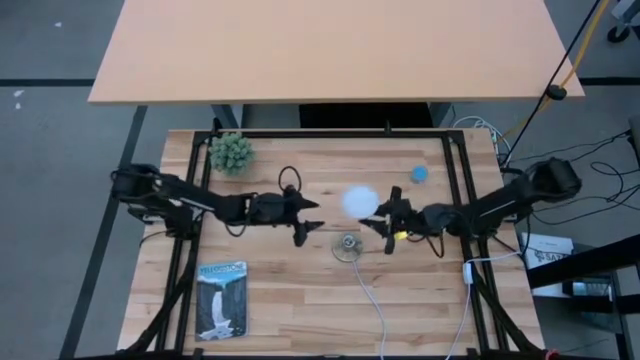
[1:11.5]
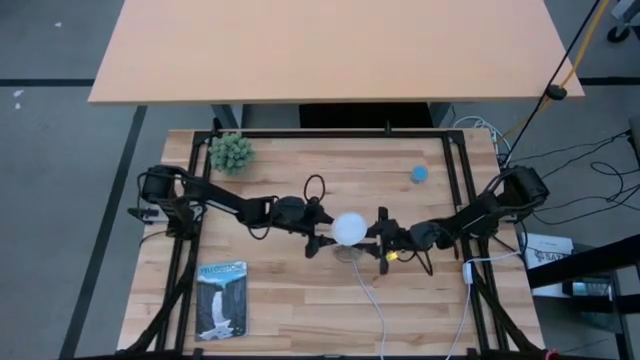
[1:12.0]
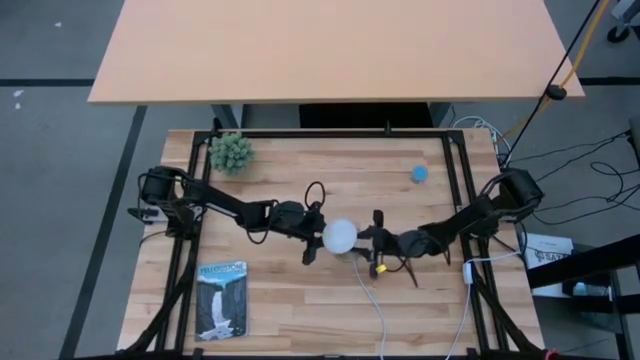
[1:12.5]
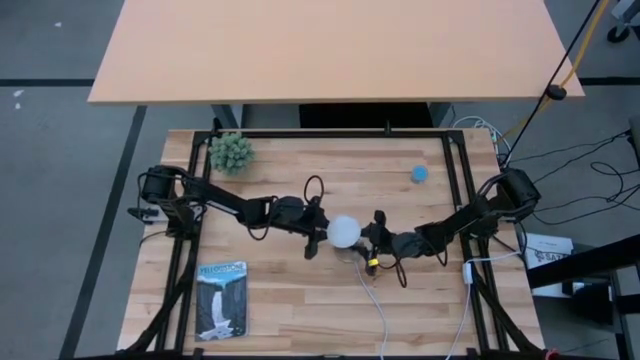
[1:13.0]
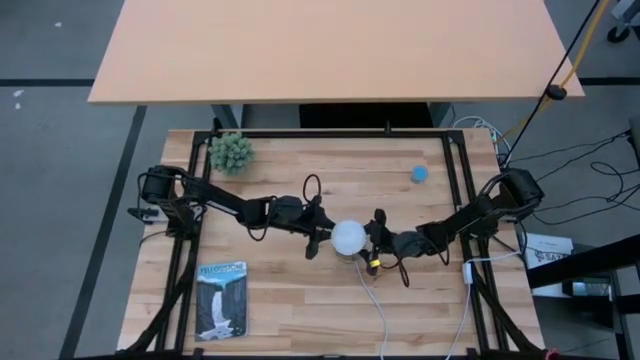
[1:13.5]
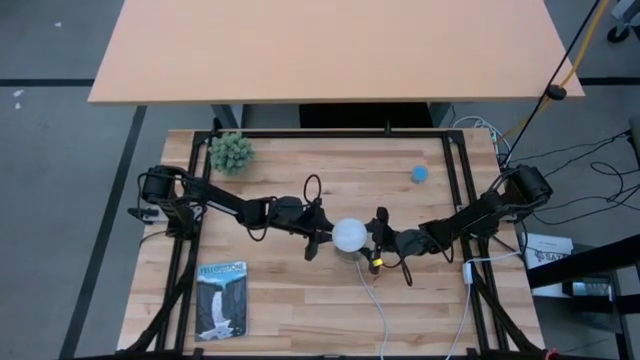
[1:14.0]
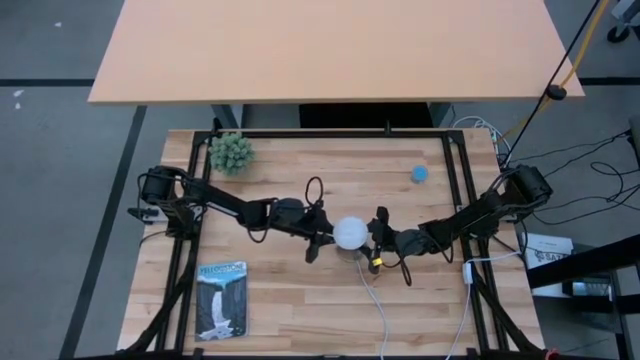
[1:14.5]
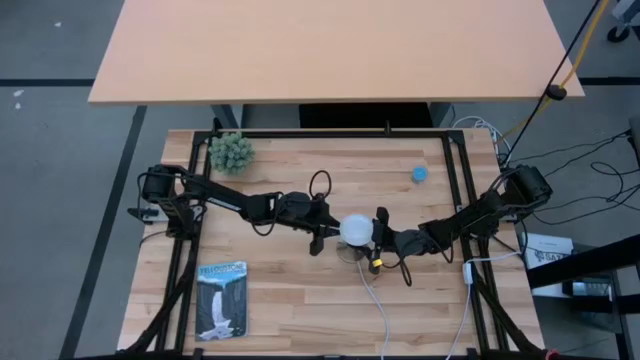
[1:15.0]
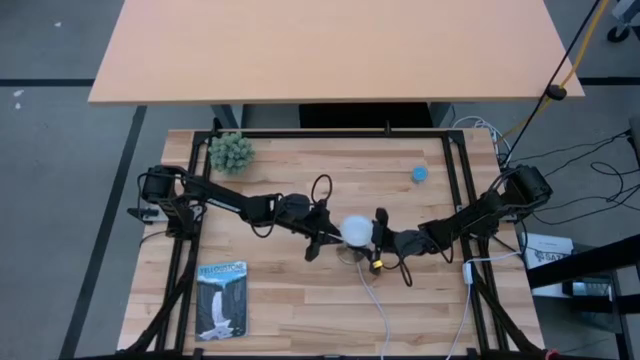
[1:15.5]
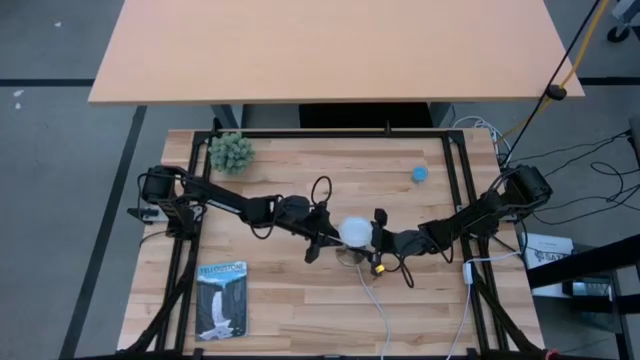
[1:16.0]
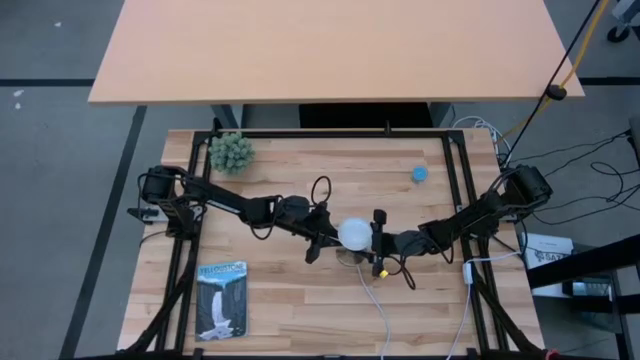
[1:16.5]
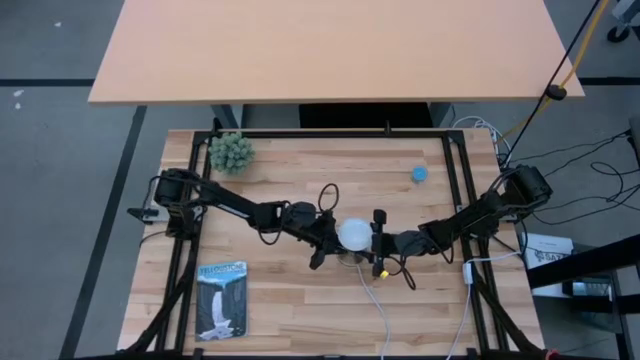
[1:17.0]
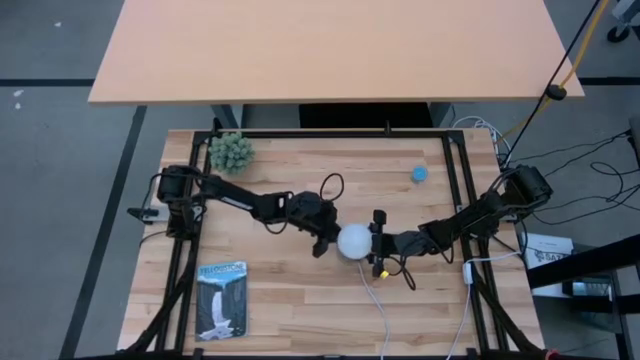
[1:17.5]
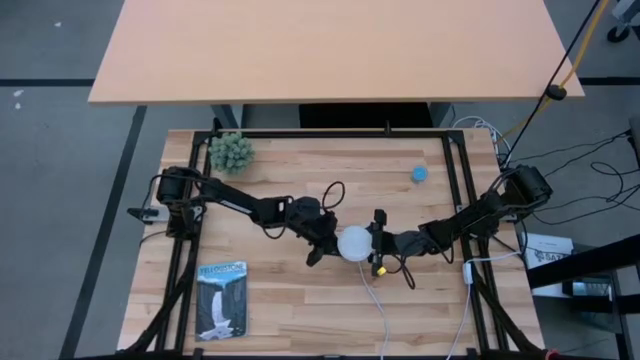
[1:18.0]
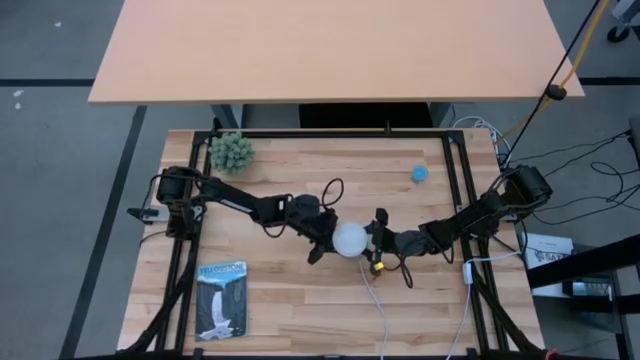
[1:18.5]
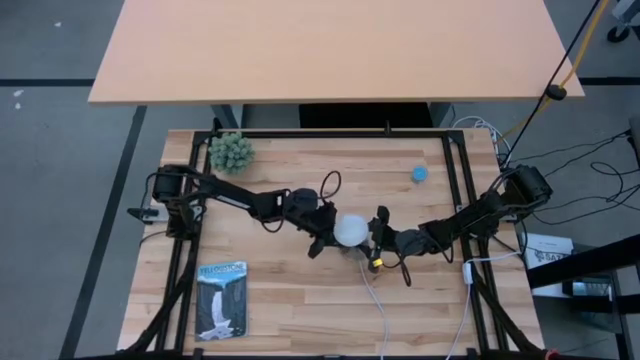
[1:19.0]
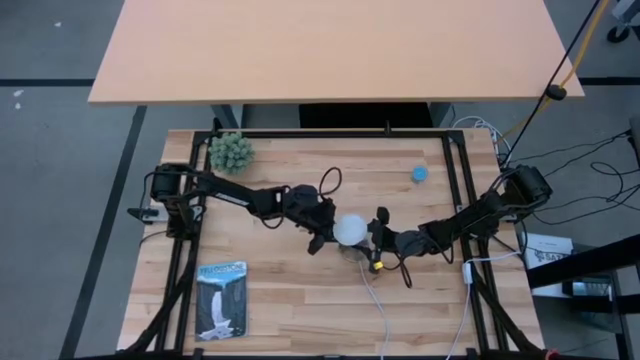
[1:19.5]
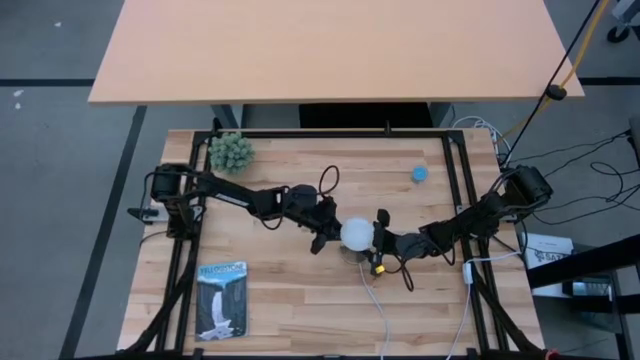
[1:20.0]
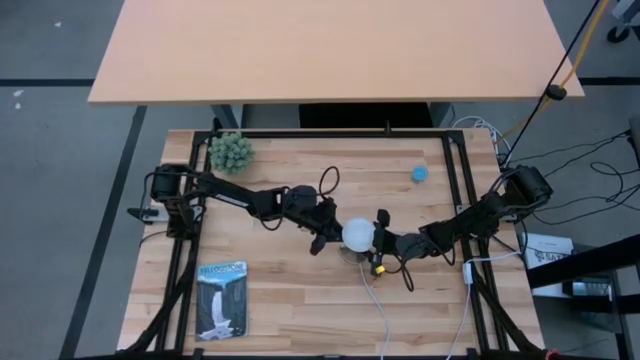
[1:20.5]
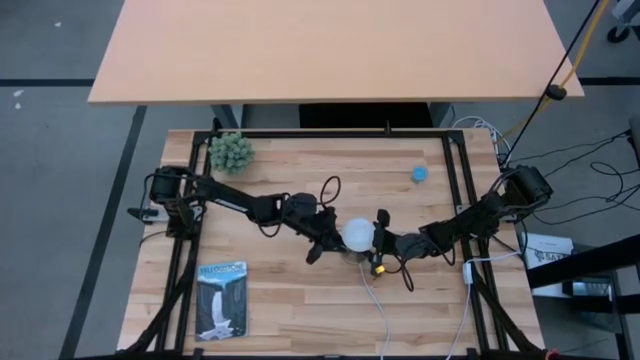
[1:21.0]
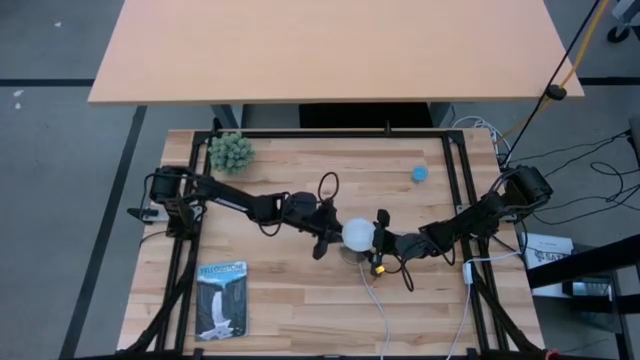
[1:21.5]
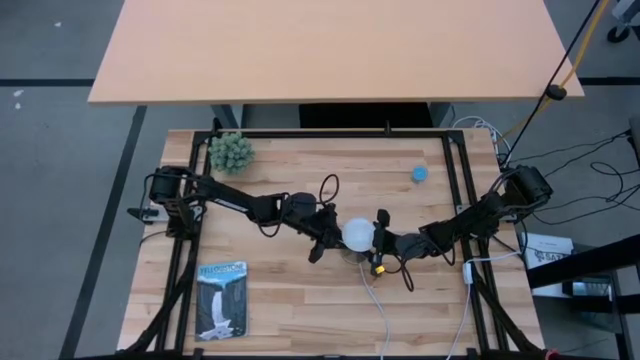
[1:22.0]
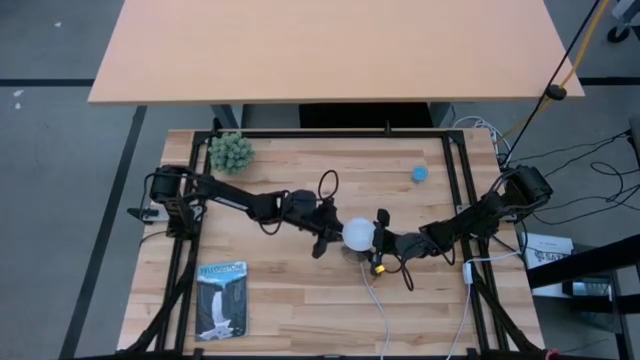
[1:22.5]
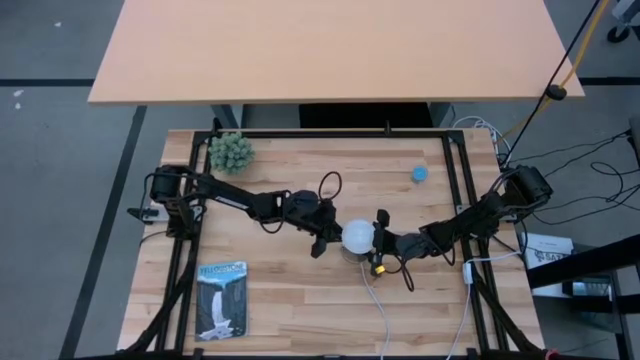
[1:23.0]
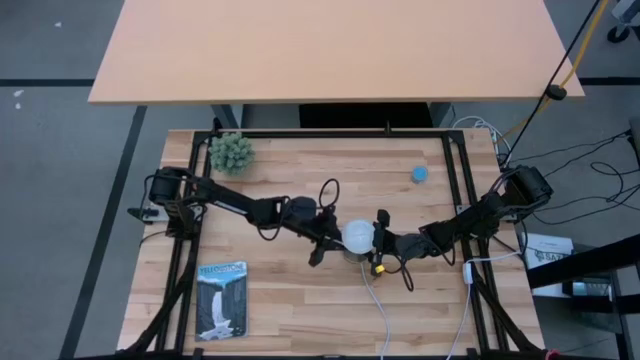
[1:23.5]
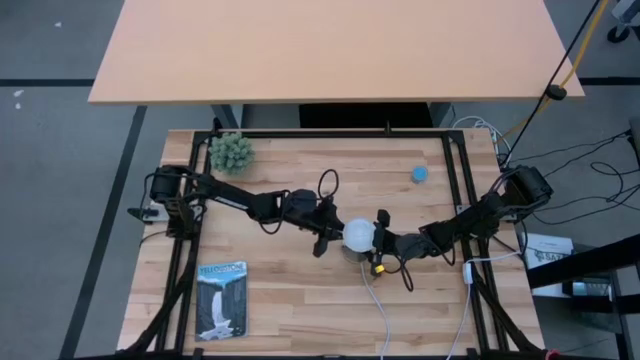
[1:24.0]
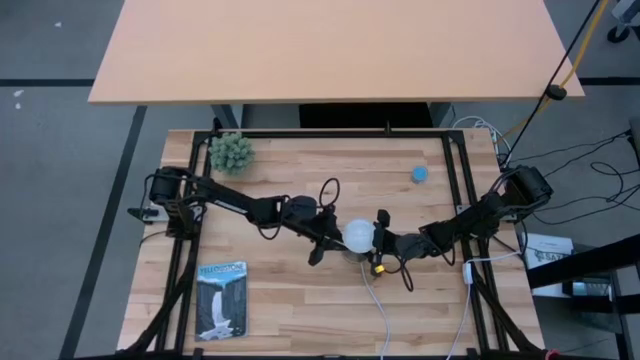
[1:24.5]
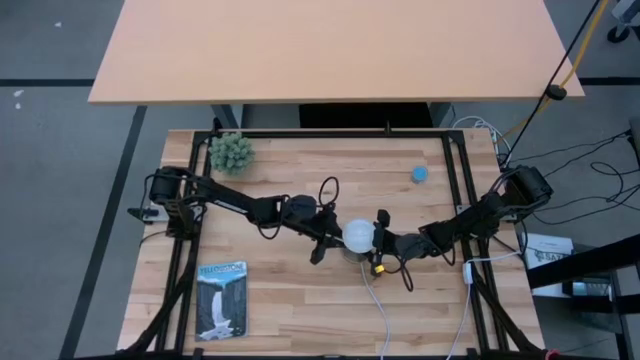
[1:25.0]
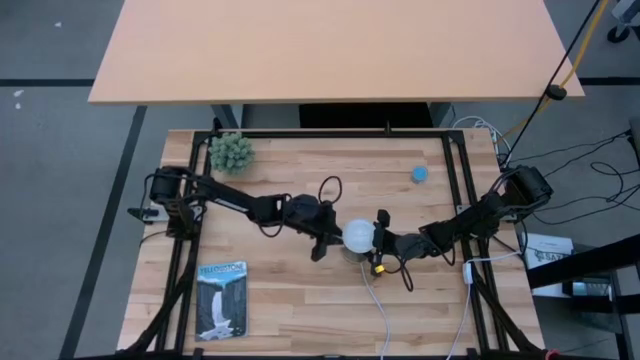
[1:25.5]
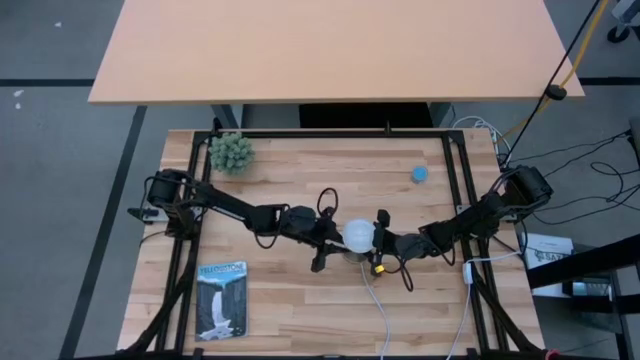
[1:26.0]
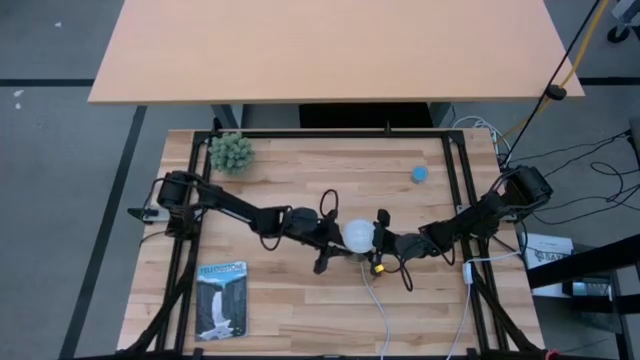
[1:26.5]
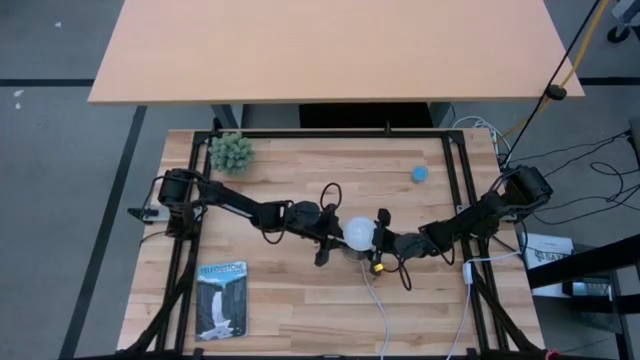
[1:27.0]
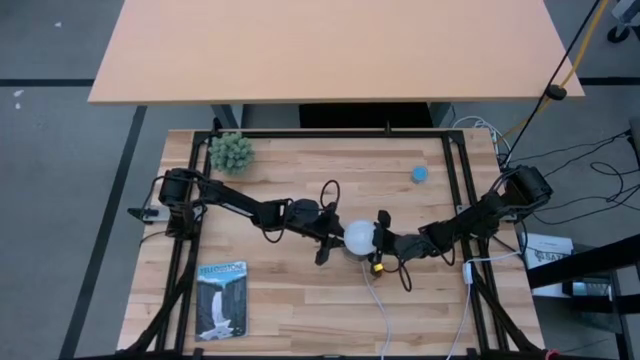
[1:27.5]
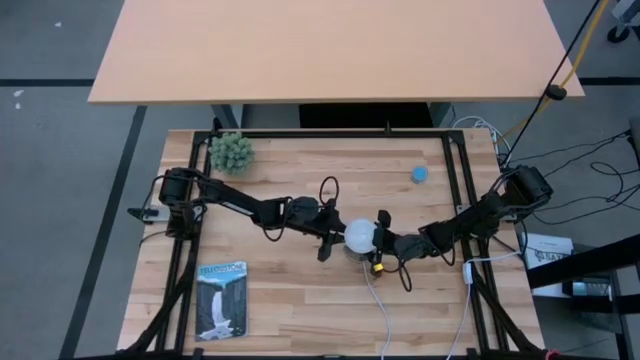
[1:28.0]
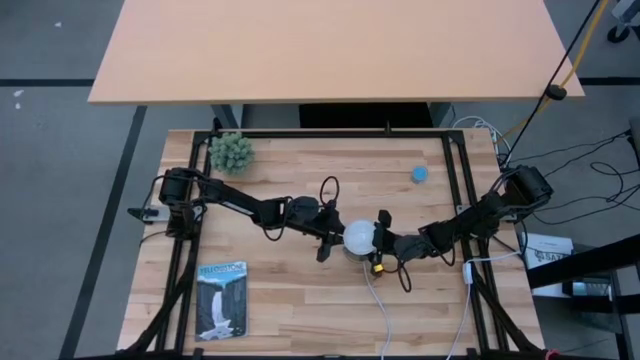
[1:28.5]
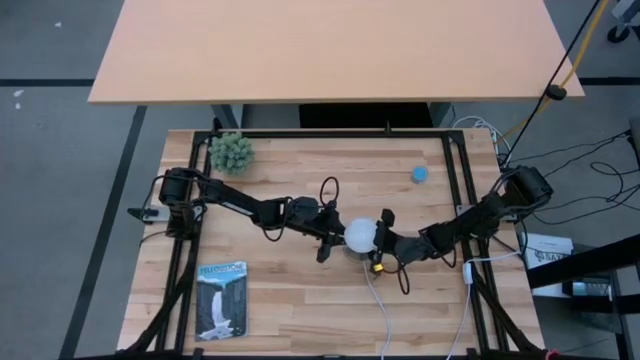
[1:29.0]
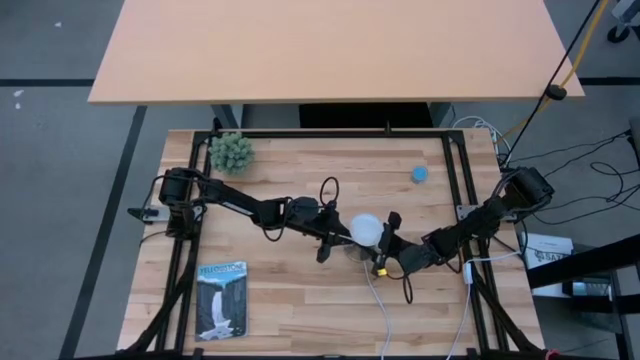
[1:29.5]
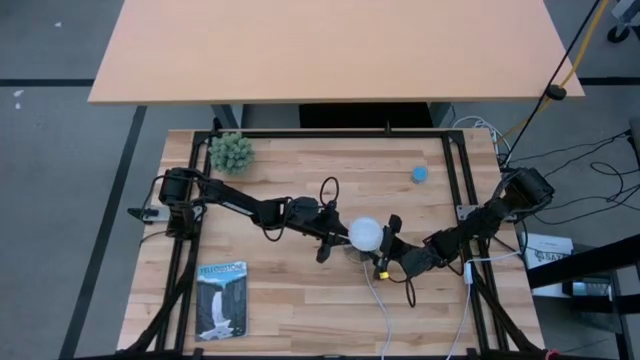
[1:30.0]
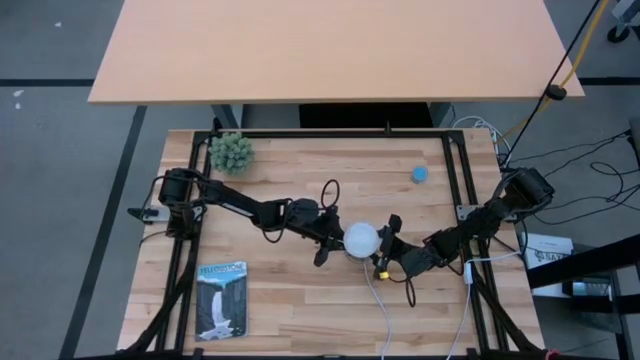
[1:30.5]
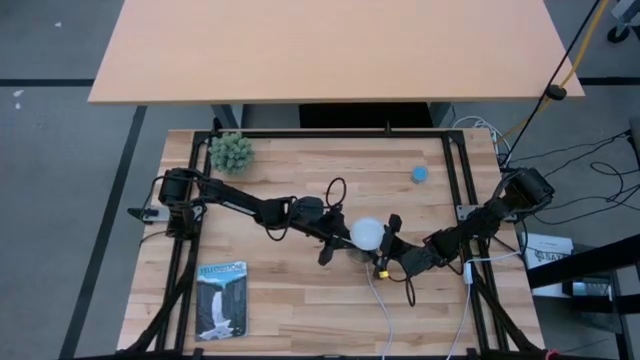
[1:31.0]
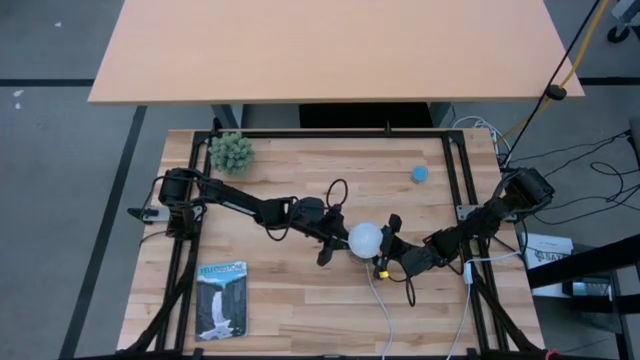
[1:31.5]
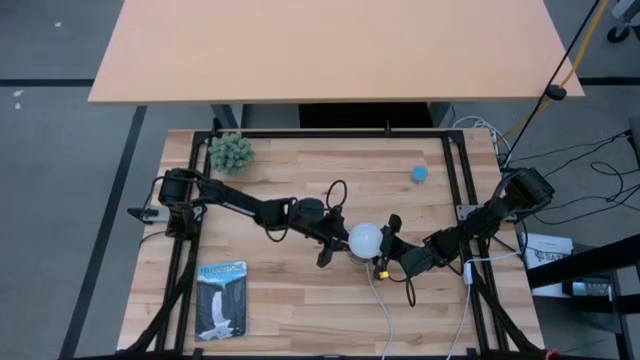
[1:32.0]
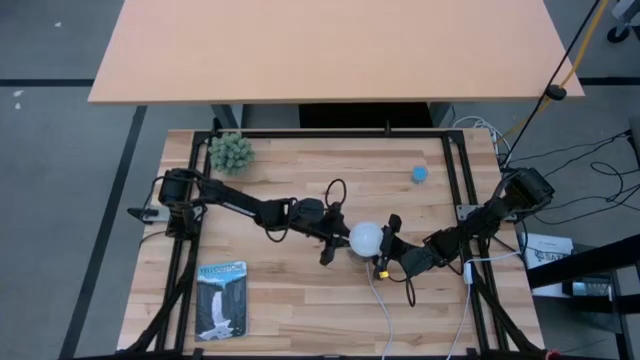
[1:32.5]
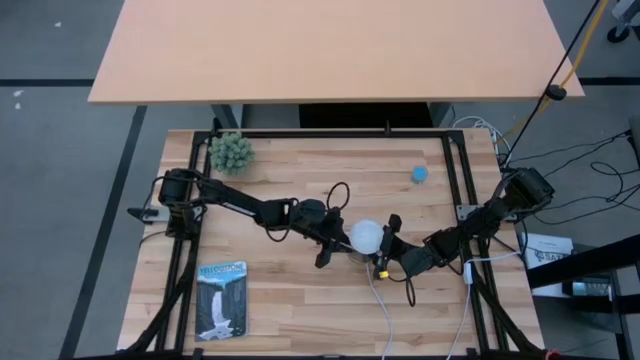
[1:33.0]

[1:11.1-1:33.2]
Task: Screw lightbulb
Insert the lightbulb into the desk lamp
